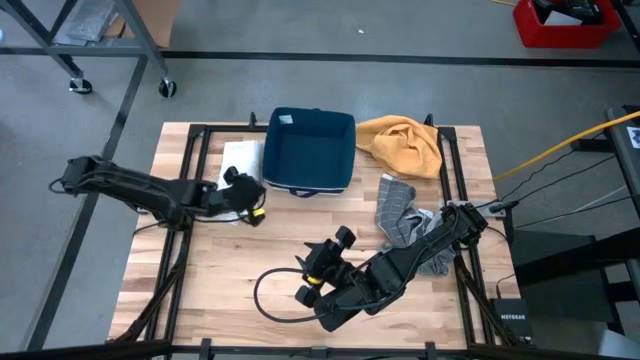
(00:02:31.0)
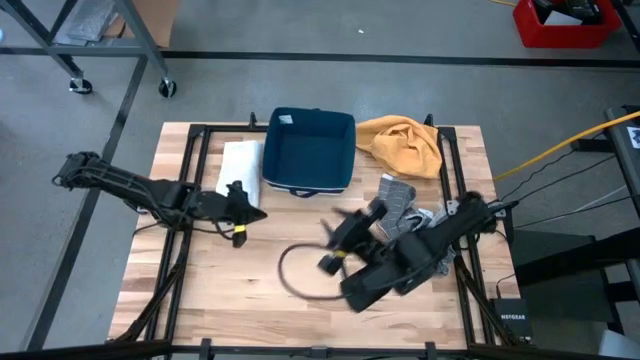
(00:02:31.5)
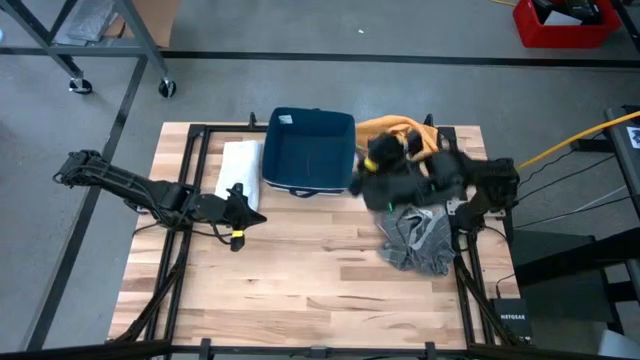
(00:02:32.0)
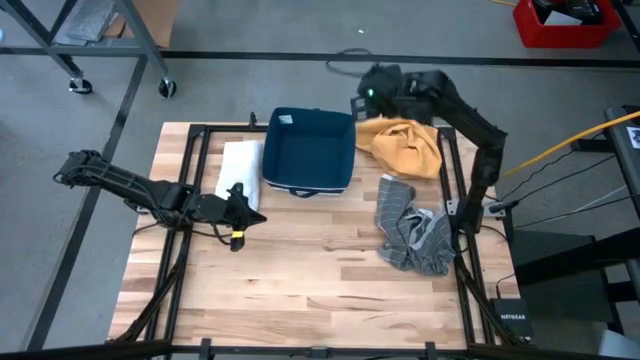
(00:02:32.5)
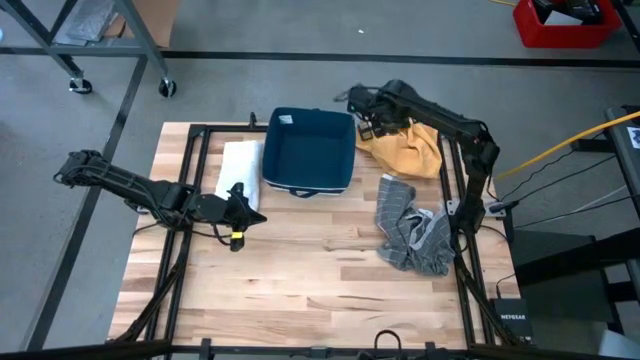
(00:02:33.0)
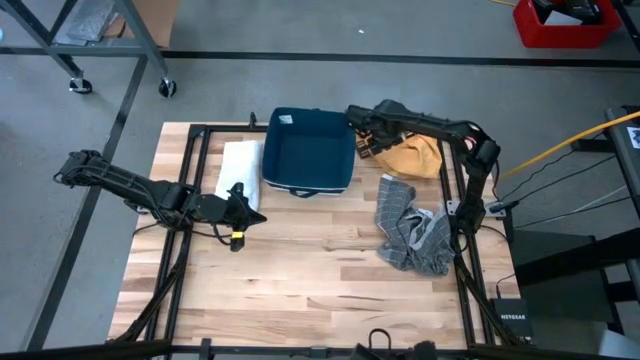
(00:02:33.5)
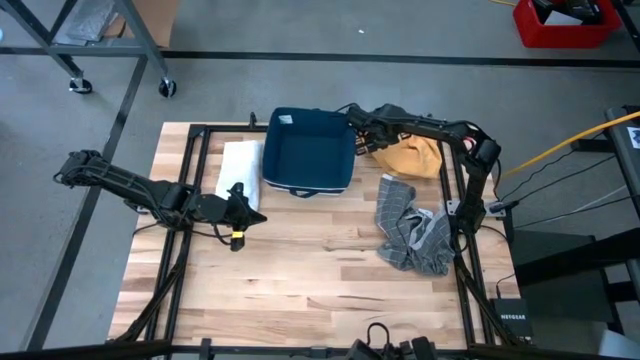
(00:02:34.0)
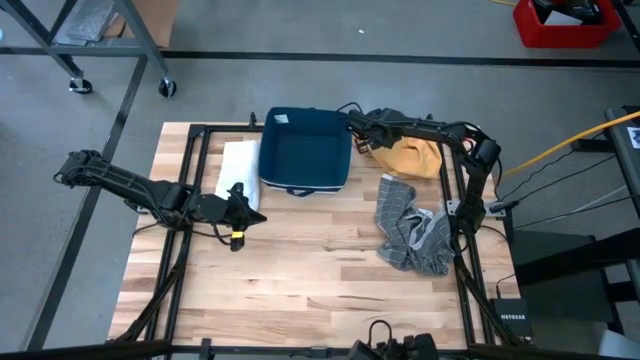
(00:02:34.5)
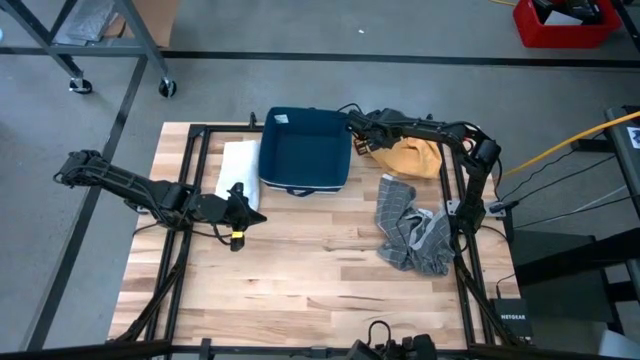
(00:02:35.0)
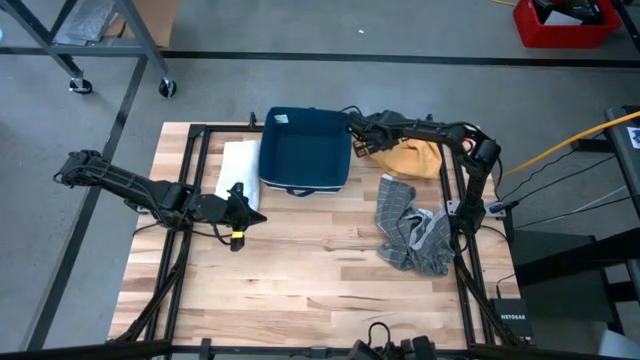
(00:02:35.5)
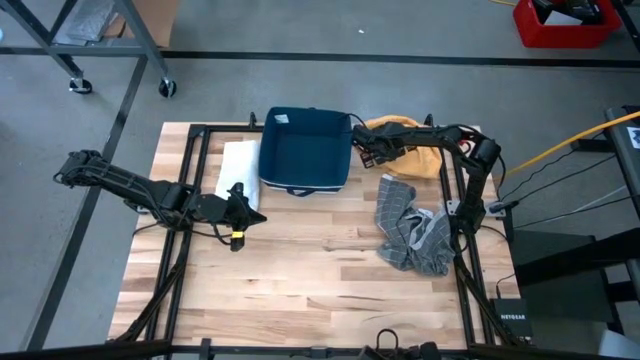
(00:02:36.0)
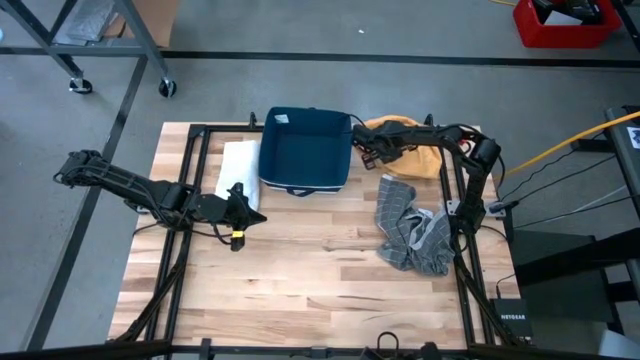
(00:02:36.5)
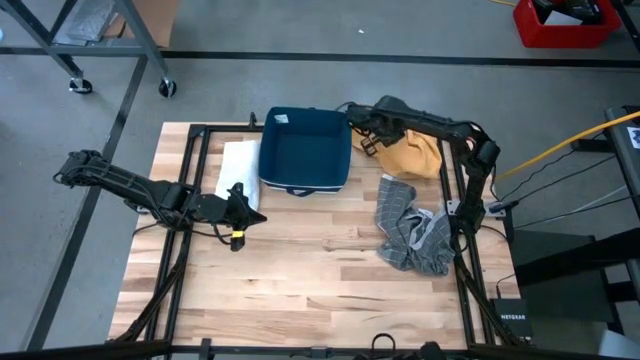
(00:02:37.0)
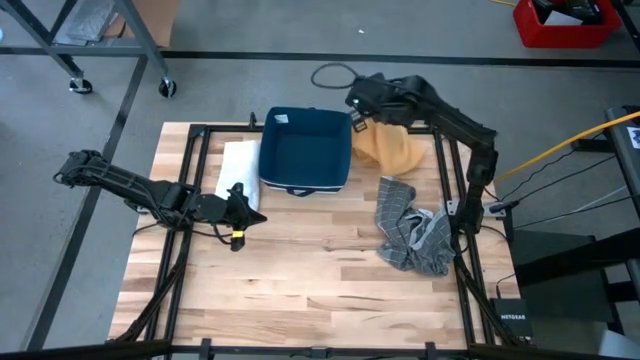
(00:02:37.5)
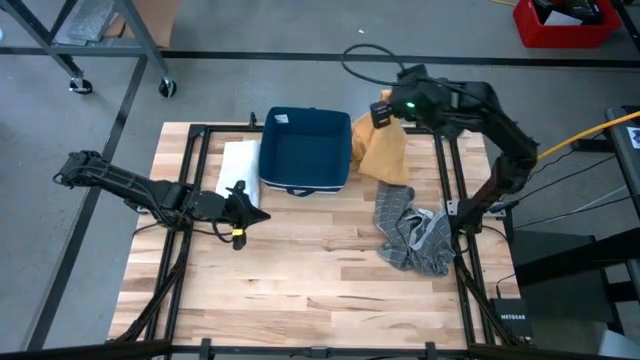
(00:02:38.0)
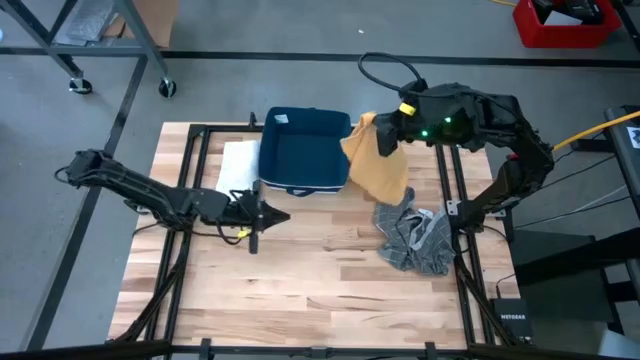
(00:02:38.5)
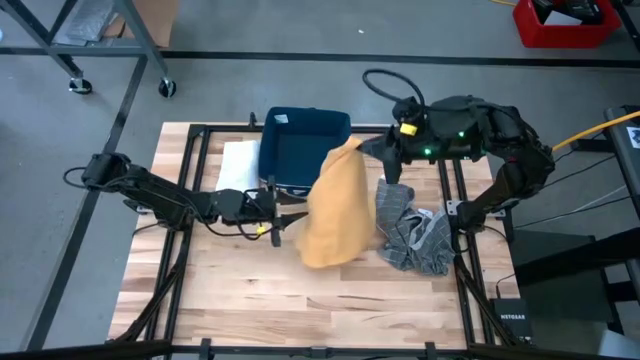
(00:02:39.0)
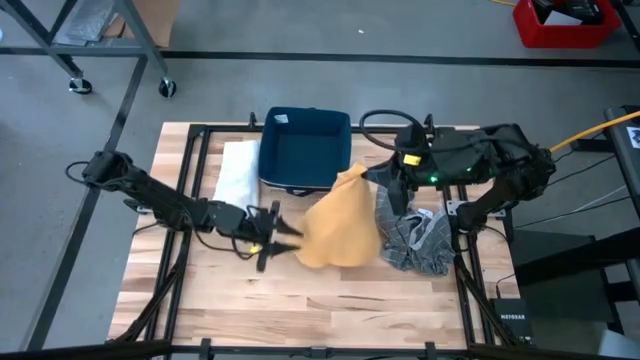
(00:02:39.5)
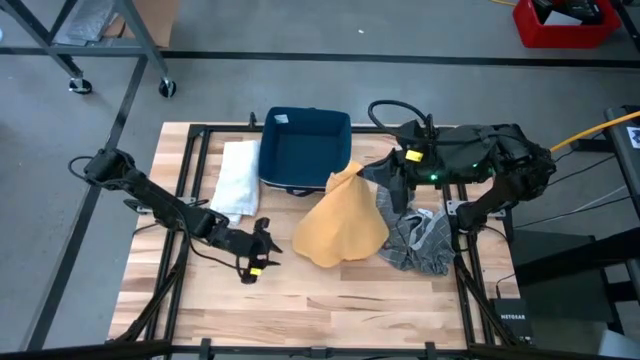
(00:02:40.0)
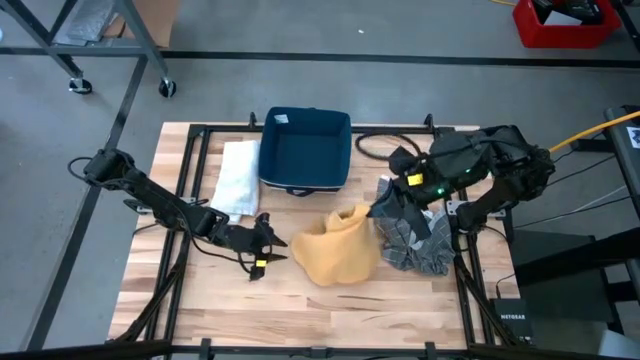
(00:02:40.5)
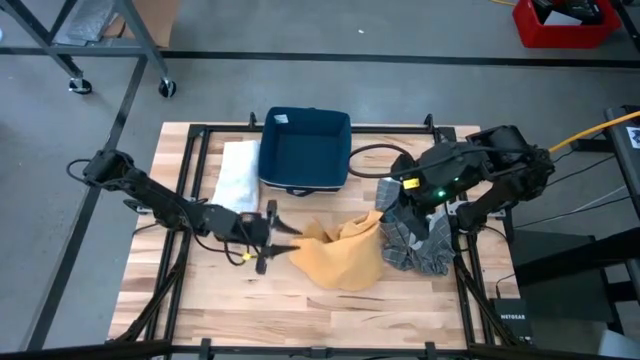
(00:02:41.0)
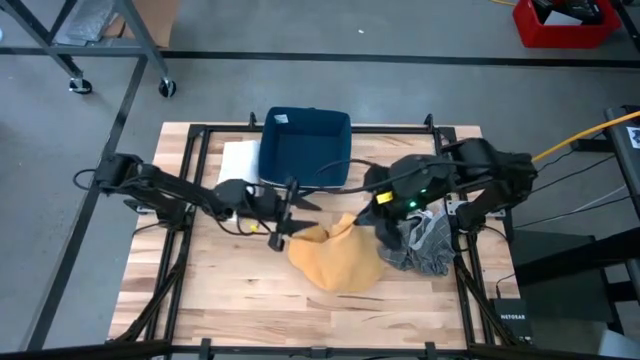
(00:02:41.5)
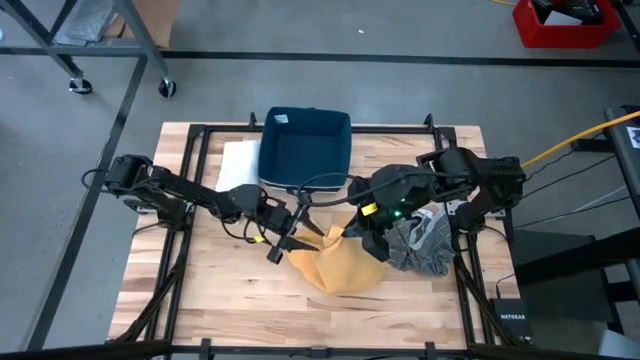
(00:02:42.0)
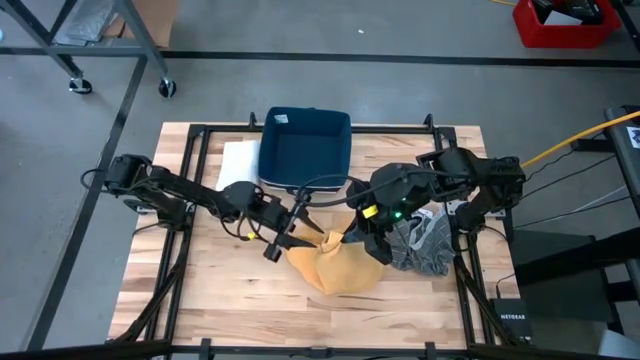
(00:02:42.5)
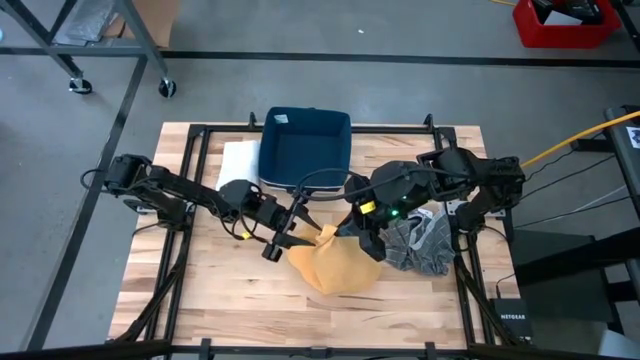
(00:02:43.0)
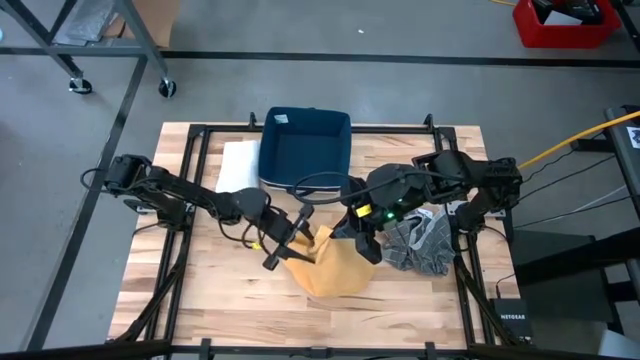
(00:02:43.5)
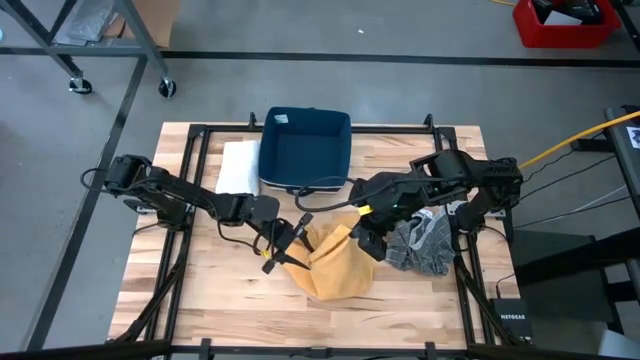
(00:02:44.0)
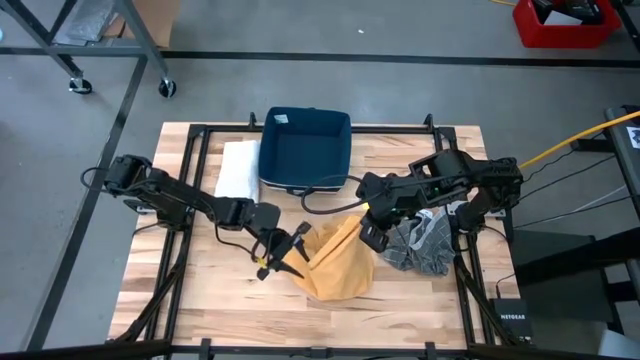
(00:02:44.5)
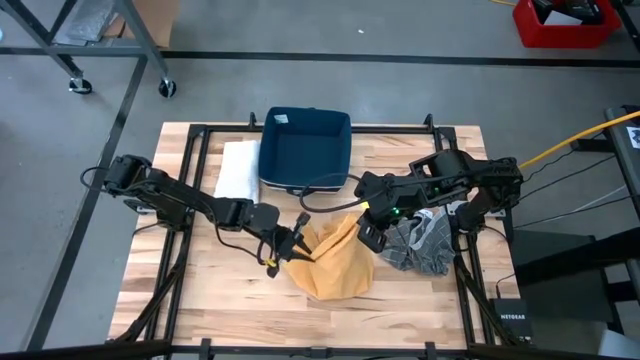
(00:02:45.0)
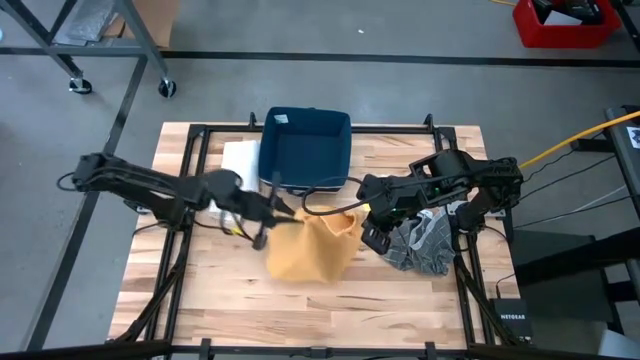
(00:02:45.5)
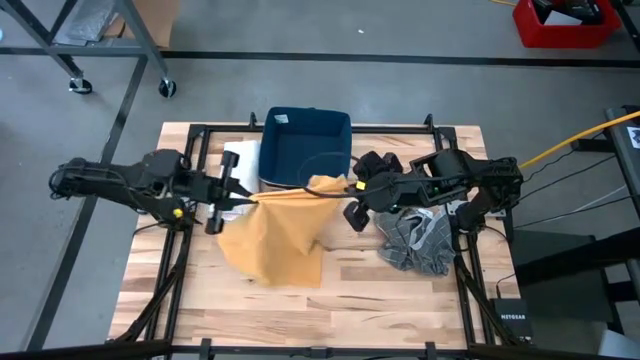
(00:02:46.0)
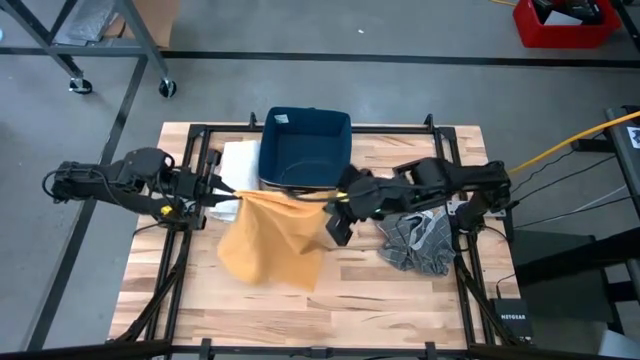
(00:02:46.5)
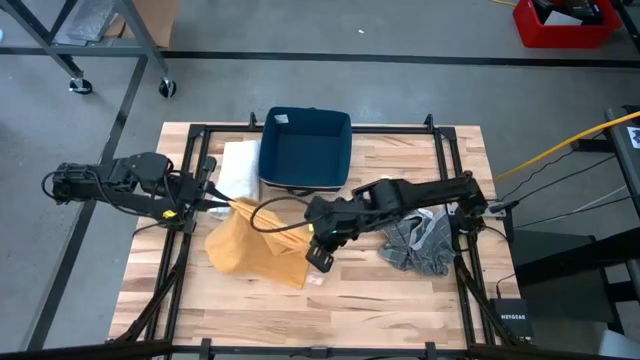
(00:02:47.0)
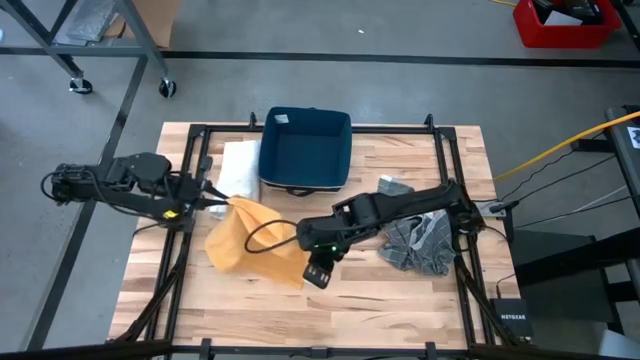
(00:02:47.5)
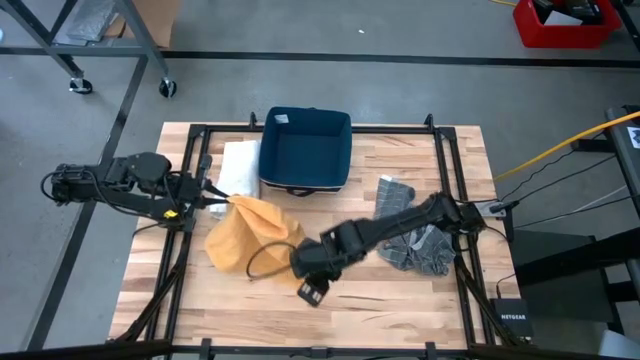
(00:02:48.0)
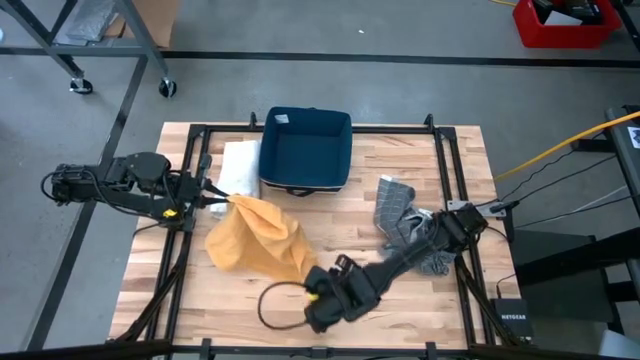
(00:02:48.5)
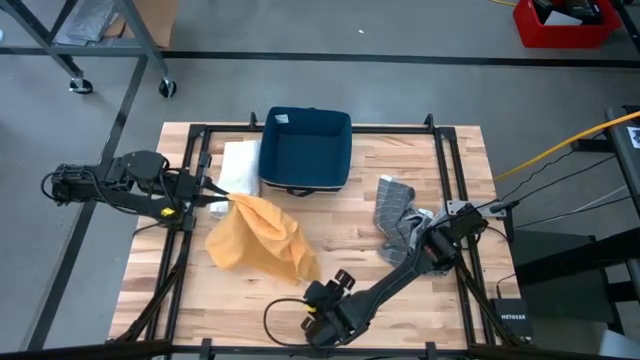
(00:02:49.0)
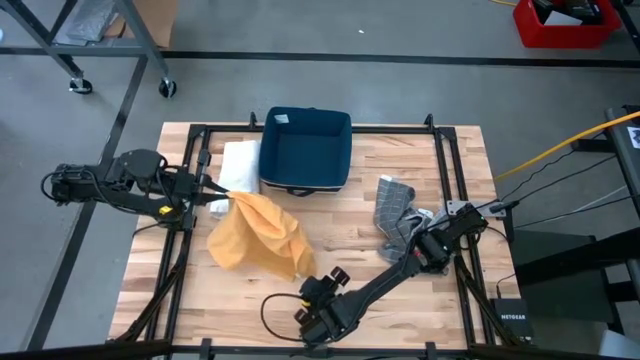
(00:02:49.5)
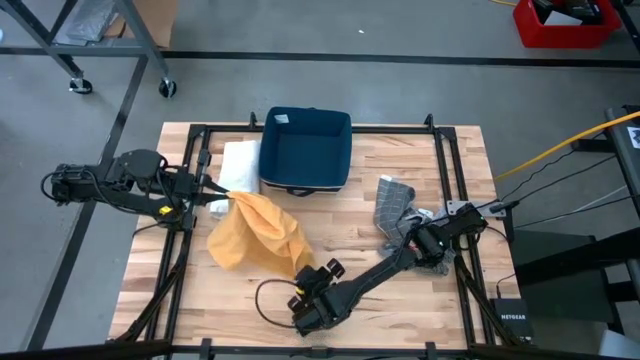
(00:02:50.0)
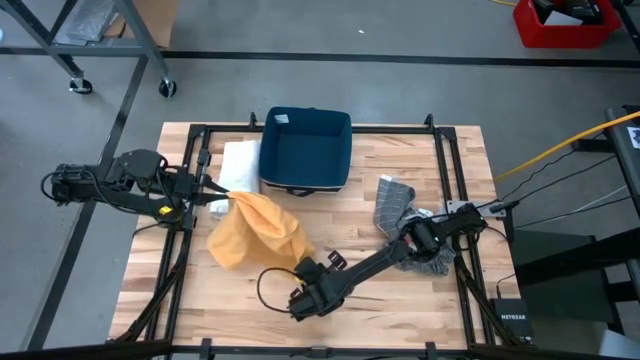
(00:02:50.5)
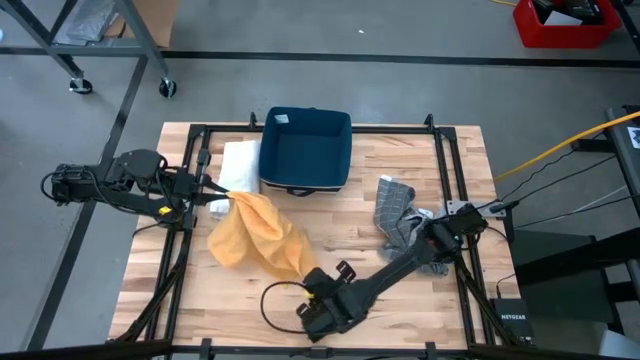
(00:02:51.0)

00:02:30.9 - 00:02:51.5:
Task: Fold towel
Fold the yellow towel
